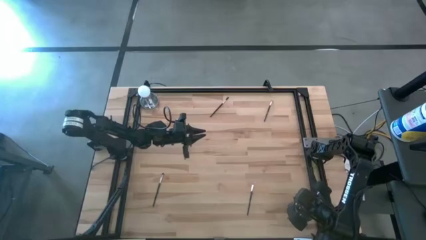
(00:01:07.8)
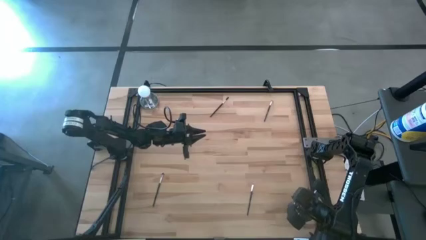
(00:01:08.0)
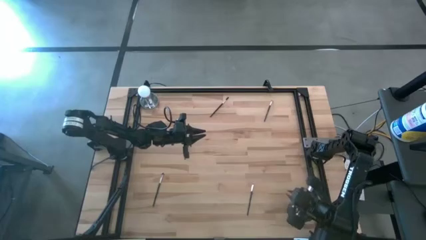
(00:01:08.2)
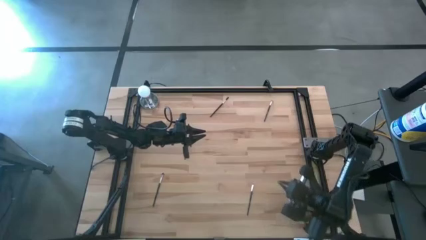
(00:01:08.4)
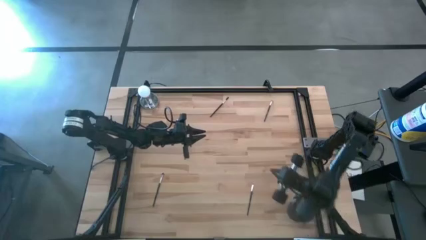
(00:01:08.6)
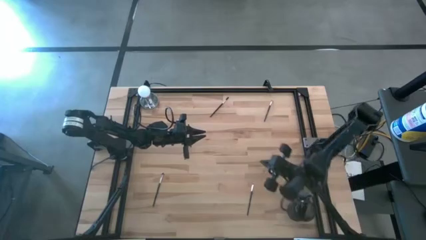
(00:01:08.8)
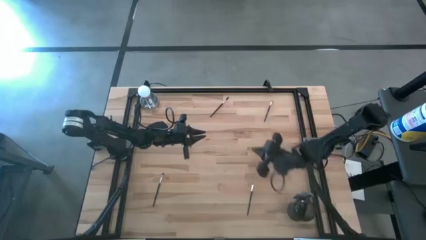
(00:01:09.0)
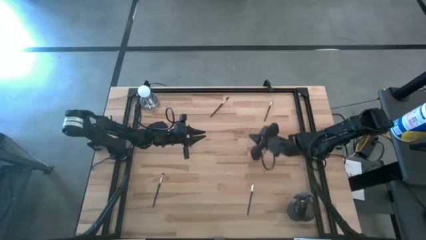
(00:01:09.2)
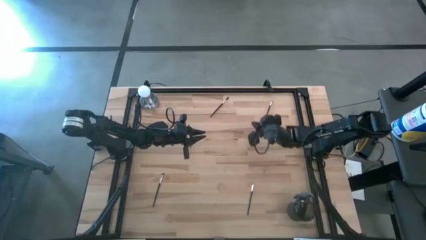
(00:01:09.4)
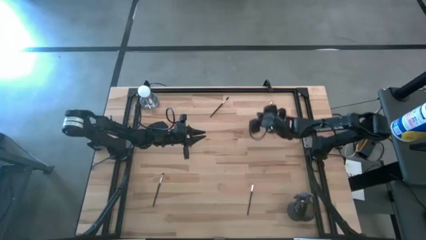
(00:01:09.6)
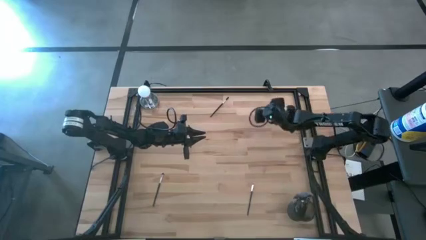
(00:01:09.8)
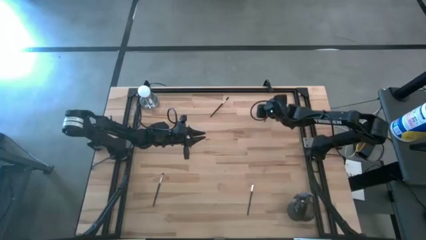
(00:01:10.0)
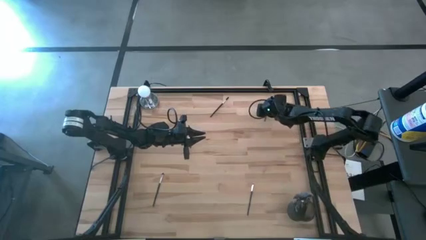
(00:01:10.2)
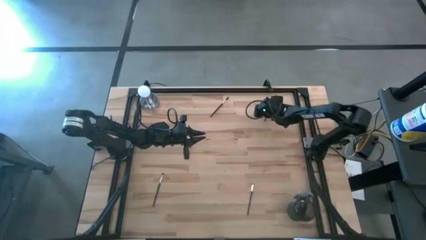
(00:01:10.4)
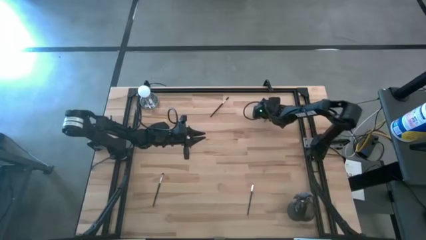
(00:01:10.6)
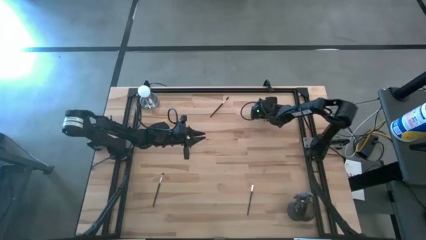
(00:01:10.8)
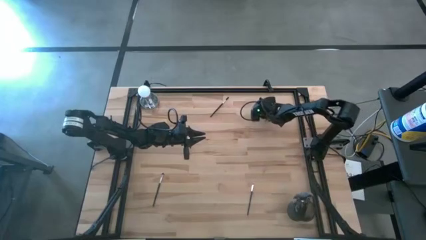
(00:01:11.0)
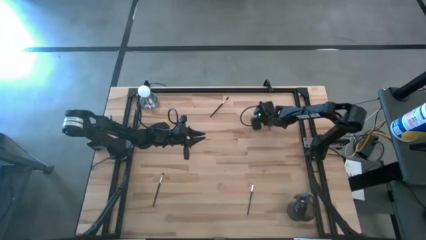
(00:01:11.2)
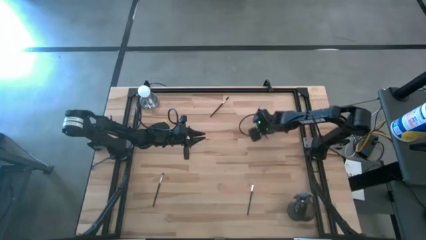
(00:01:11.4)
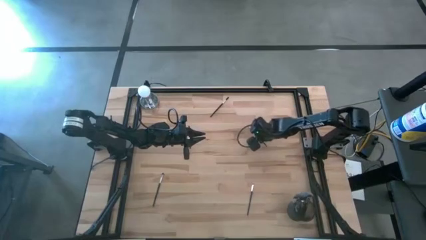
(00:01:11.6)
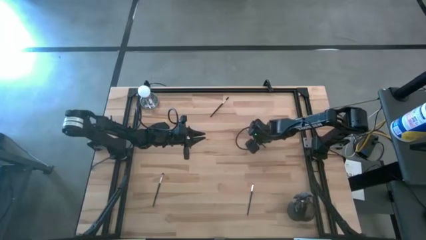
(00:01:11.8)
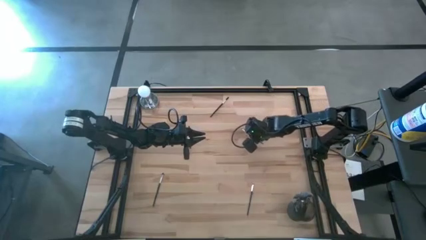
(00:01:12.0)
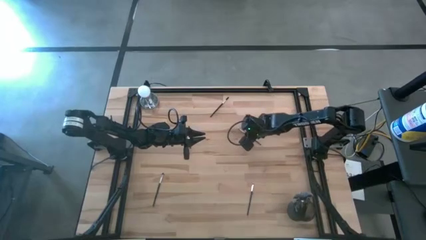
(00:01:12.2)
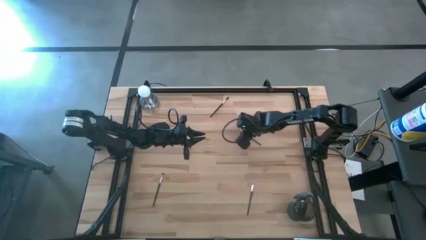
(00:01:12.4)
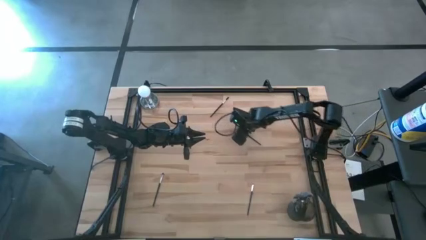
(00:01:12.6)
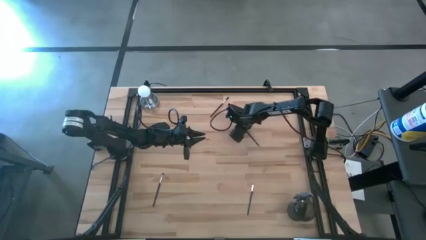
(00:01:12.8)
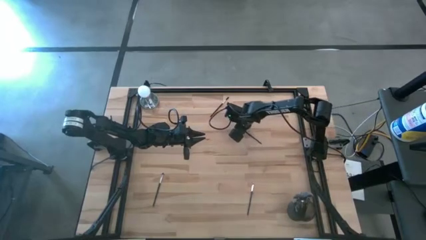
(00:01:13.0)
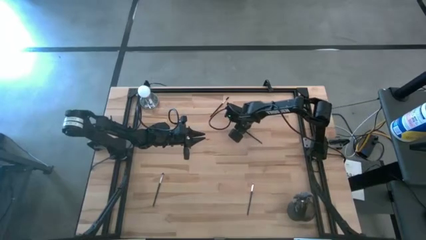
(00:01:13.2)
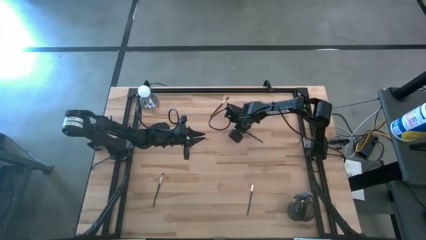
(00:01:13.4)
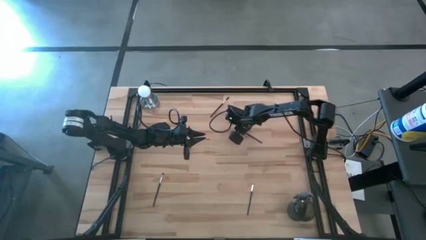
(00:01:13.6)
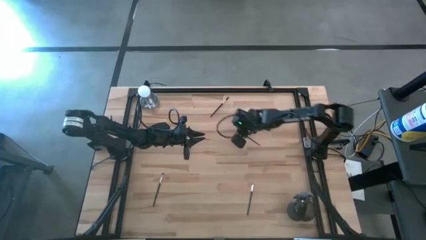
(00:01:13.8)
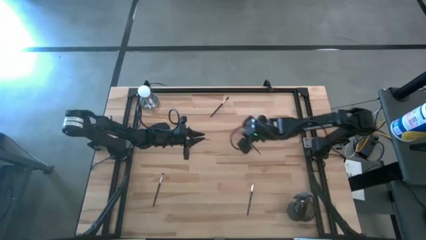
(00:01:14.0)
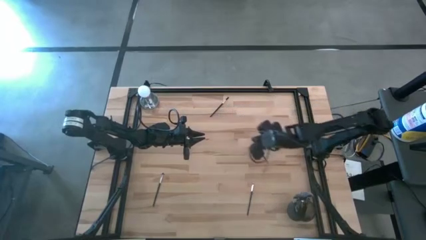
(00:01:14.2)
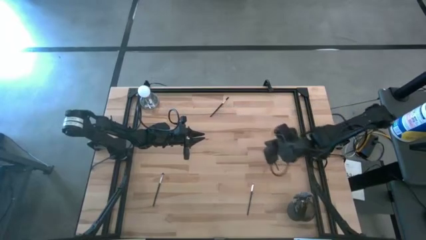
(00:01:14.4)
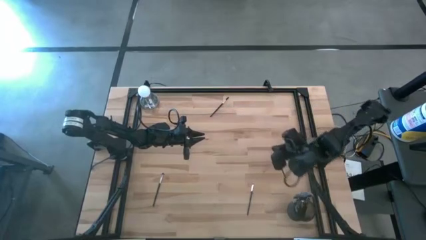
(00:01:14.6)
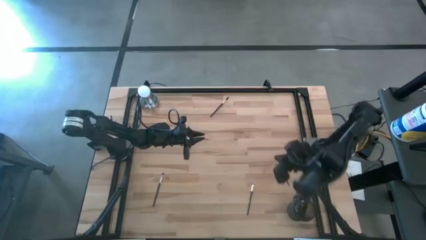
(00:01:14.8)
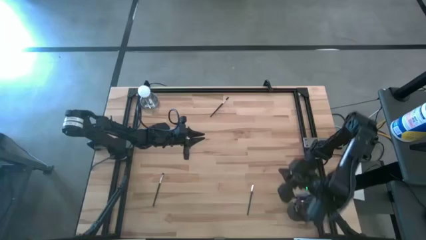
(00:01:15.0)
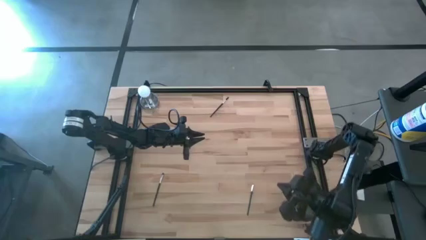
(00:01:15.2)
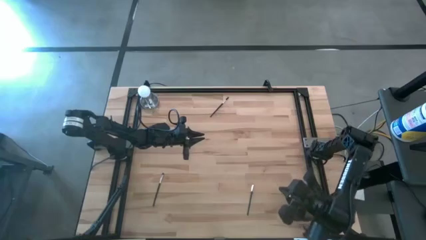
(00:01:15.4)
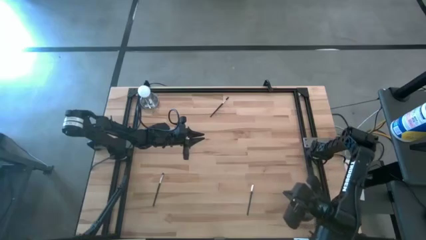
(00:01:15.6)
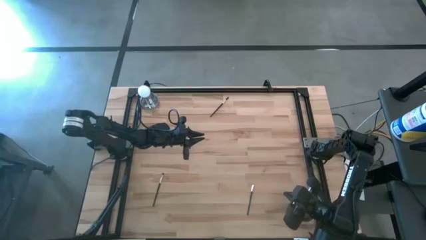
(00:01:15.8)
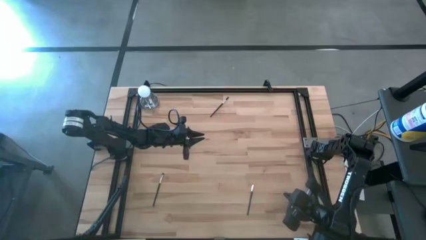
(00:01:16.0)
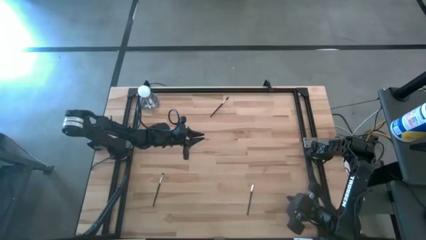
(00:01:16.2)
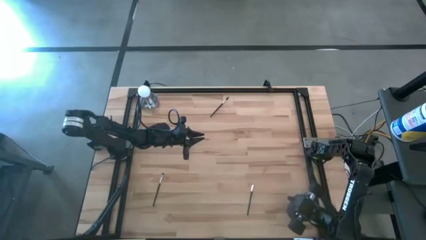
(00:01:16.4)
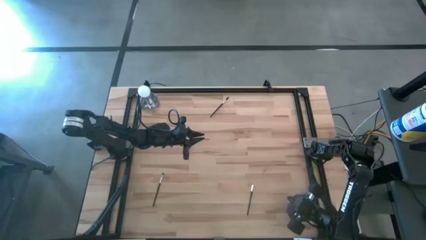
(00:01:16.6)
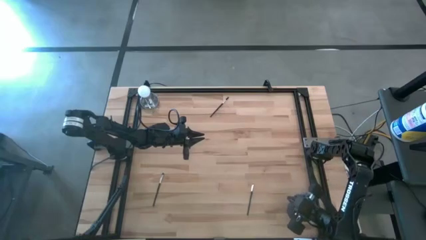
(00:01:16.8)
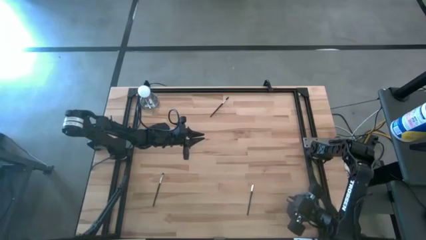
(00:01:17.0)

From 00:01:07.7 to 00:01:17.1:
Task: Pick & Place Makeup Brushes
Put the black eyeshadow brush into the makeup holder

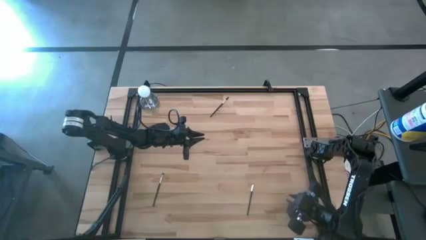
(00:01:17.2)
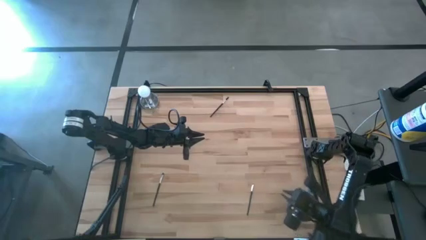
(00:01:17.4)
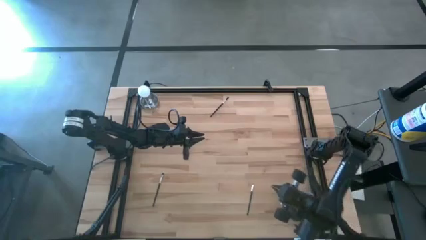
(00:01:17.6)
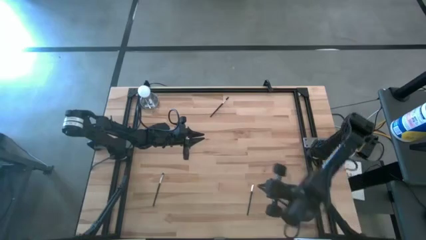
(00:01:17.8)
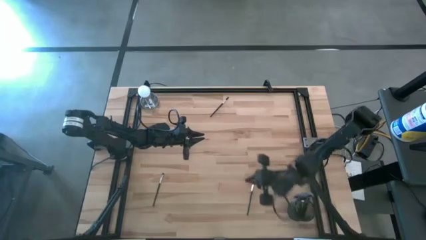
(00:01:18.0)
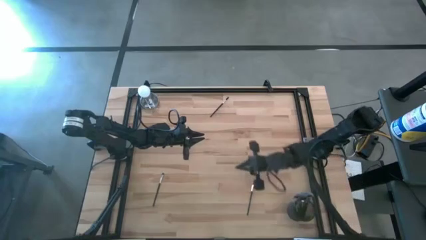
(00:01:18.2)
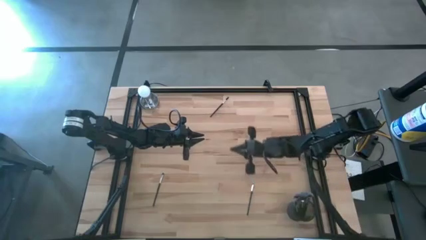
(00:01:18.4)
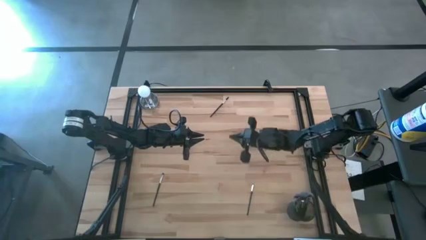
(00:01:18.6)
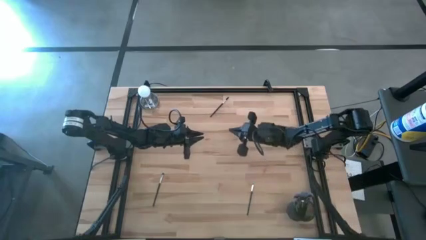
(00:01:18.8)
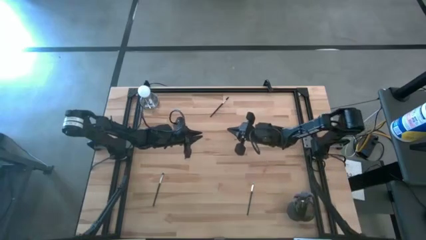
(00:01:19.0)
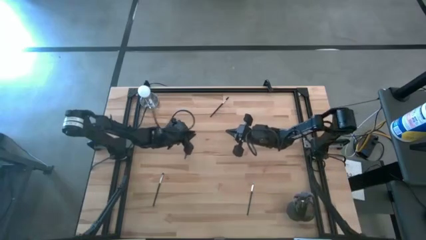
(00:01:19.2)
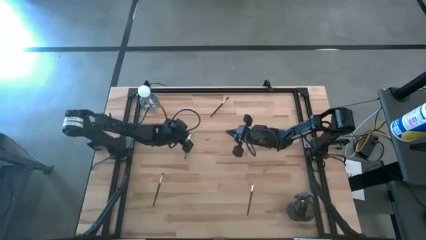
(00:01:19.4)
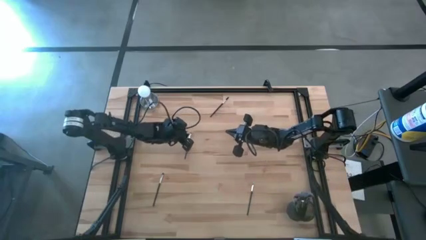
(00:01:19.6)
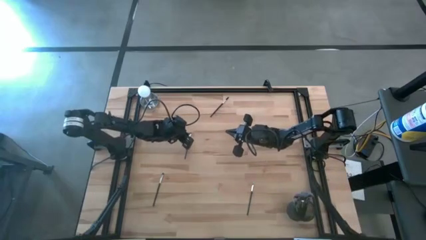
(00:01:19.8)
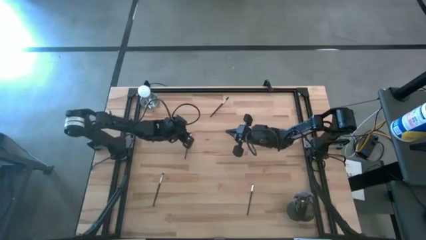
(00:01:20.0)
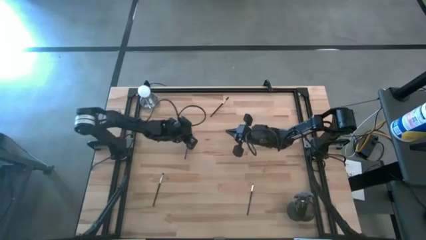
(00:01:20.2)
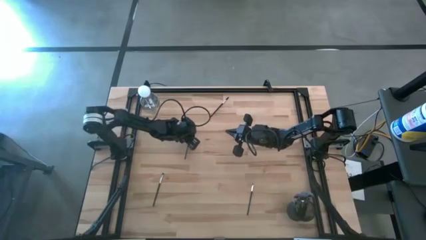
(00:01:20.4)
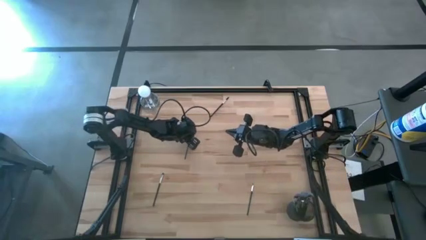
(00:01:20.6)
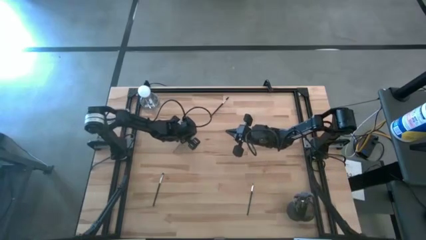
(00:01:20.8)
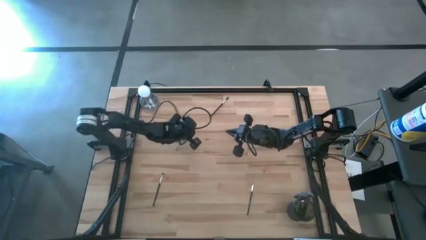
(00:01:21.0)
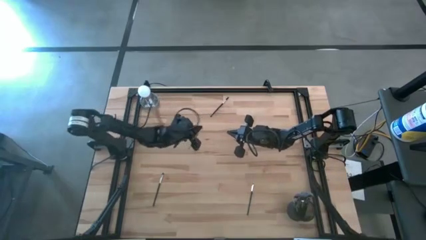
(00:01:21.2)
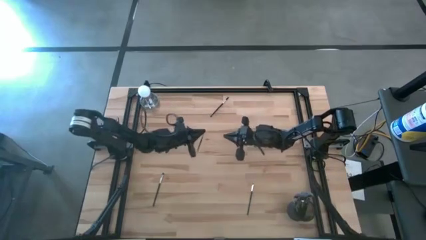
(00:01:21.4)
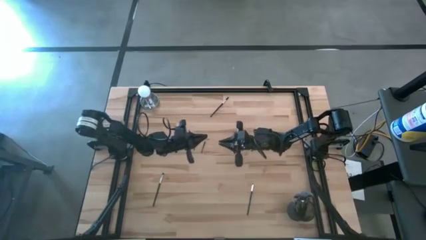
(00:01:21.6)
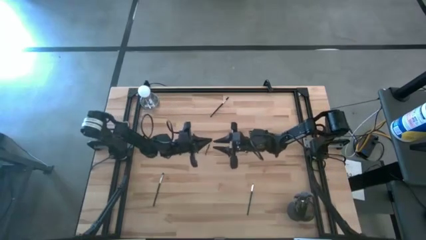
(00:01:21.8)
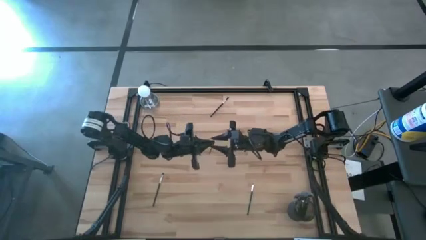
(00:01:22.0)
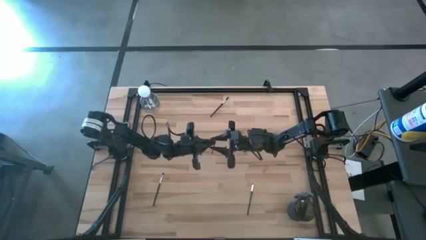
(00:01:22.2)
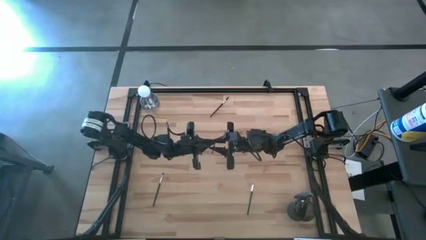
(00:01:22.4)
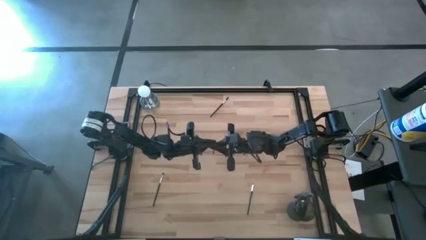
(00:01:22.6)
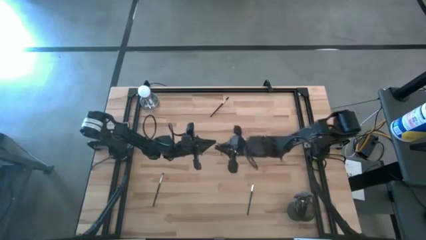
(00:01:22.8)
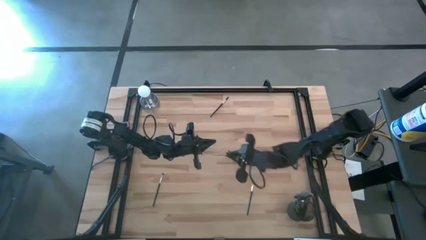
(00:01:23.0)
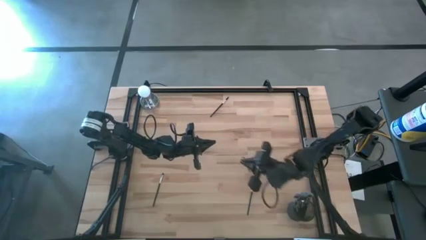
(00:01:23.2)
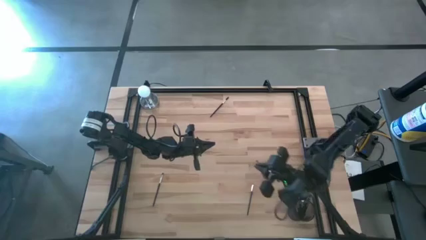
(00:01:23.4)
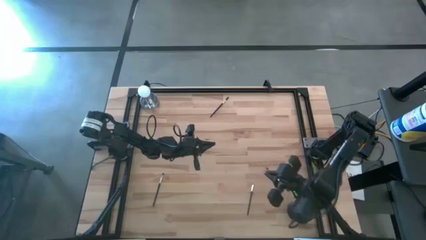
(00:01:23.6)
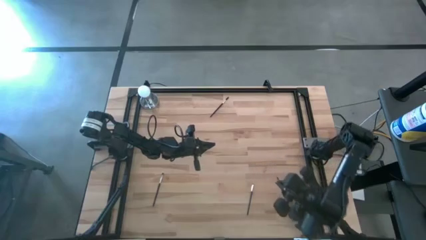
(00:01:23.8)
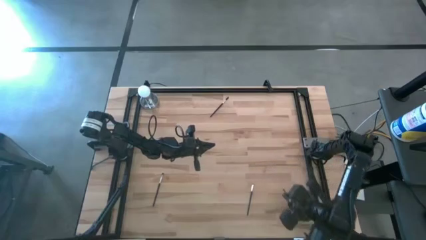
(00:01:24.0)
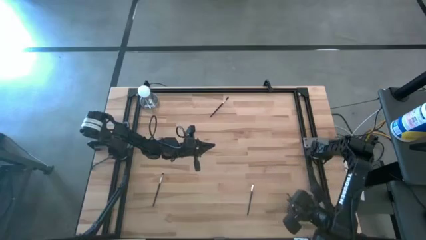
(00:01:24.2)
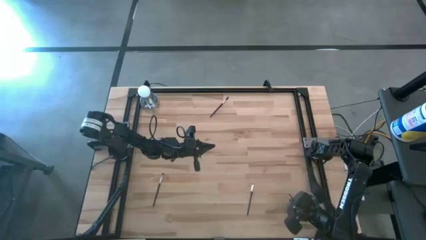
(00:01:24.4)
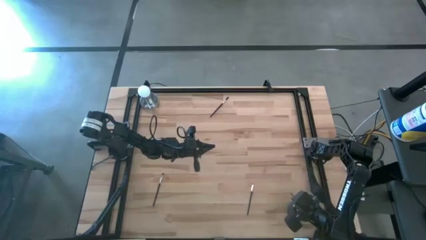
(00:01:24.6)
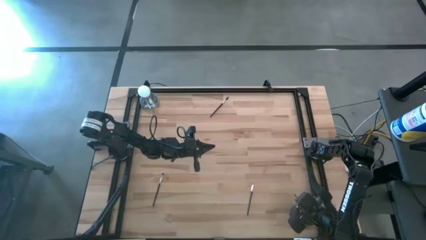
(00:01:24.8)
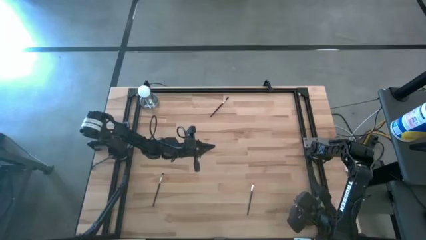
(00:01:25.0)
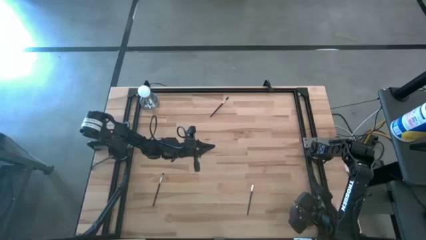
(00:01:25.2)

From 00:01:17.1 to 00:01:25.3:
Put the black eyeshadow brush into the makeup holder
